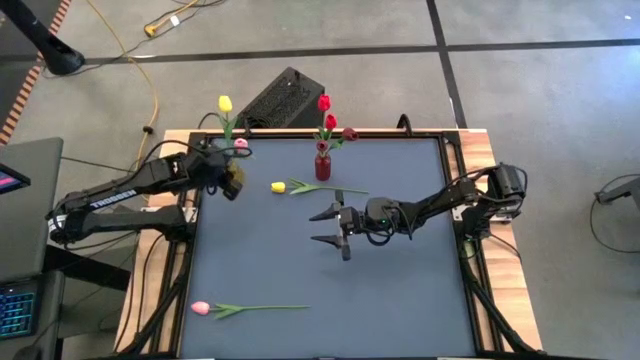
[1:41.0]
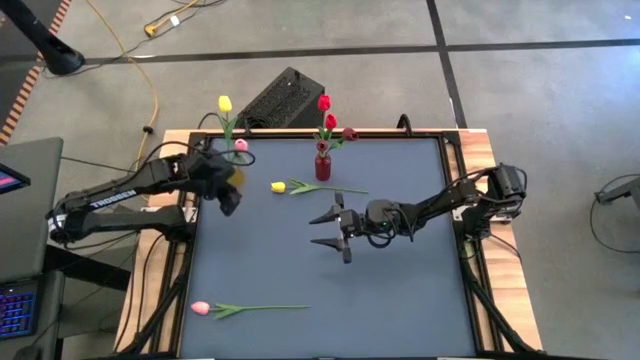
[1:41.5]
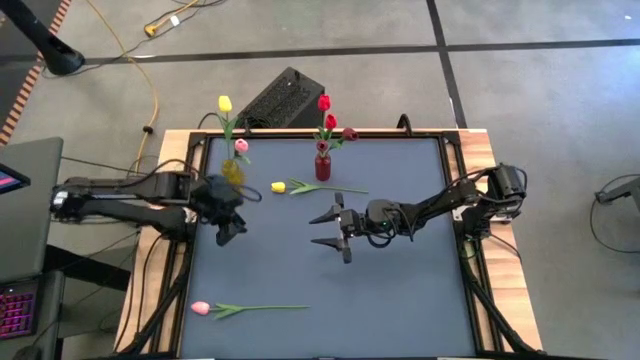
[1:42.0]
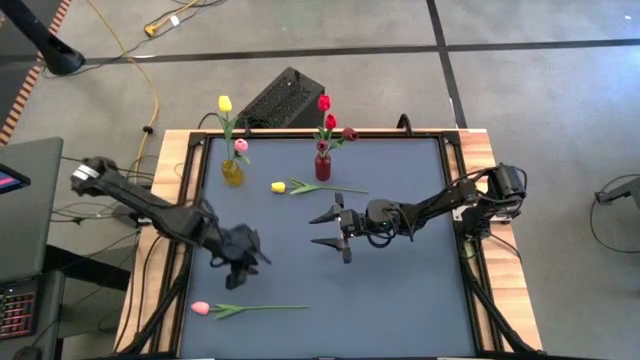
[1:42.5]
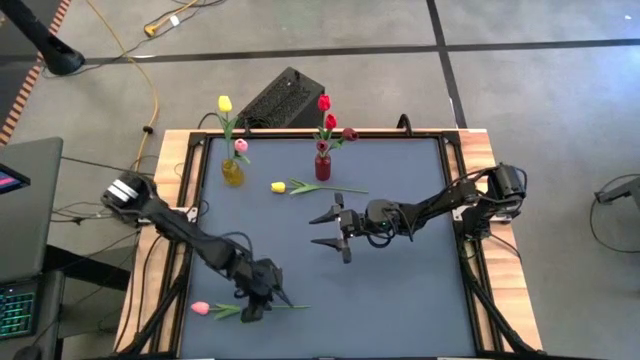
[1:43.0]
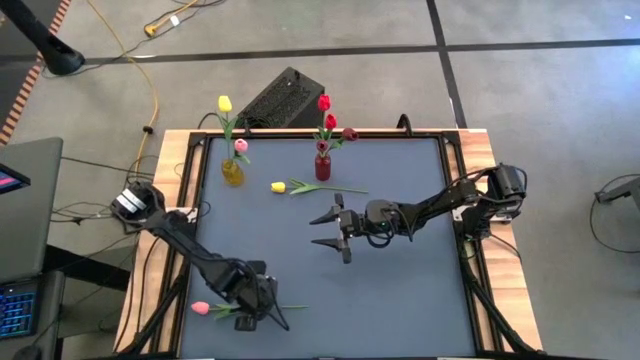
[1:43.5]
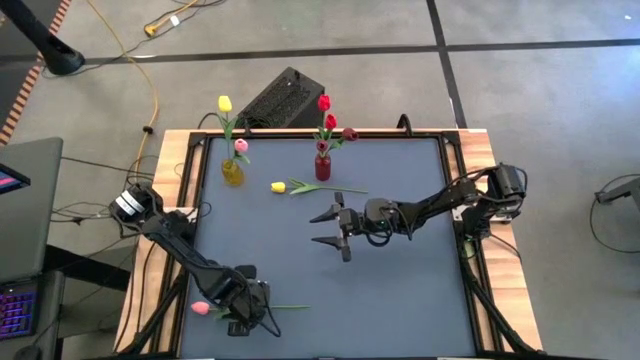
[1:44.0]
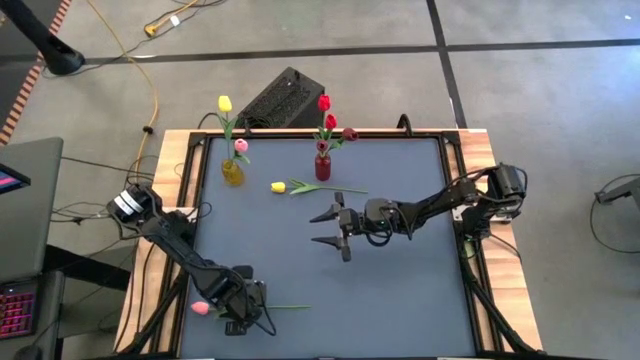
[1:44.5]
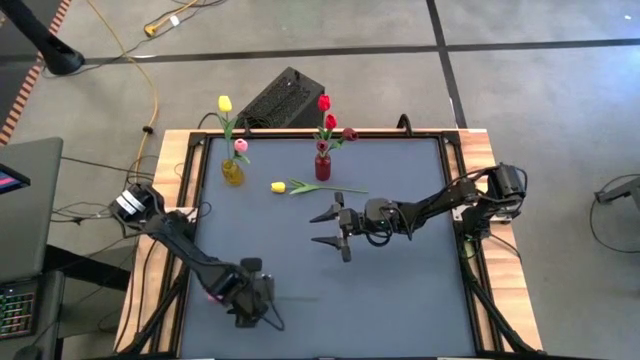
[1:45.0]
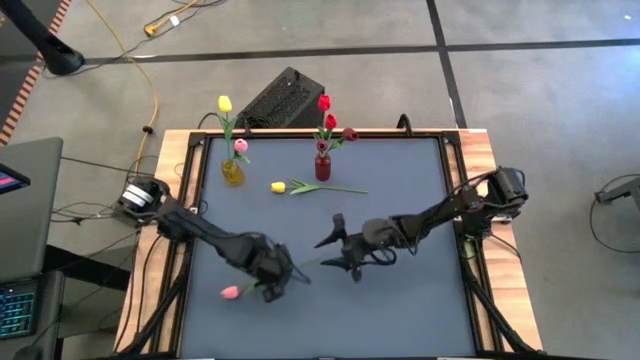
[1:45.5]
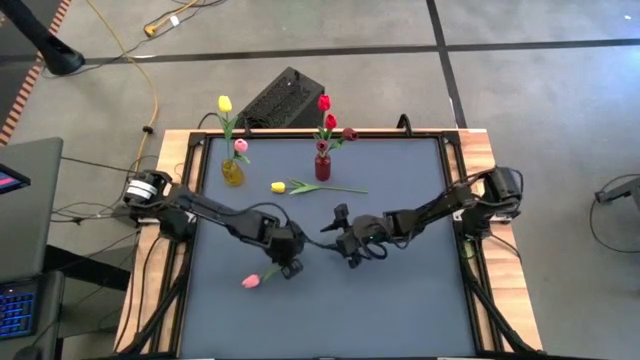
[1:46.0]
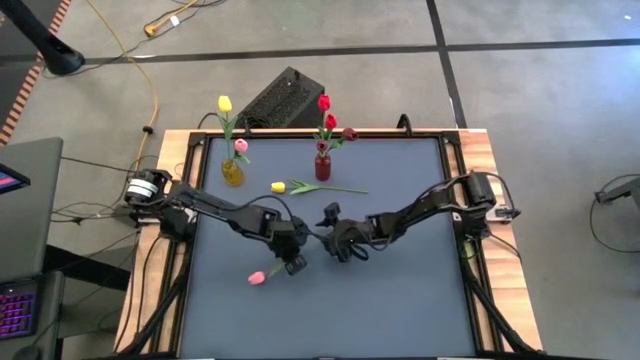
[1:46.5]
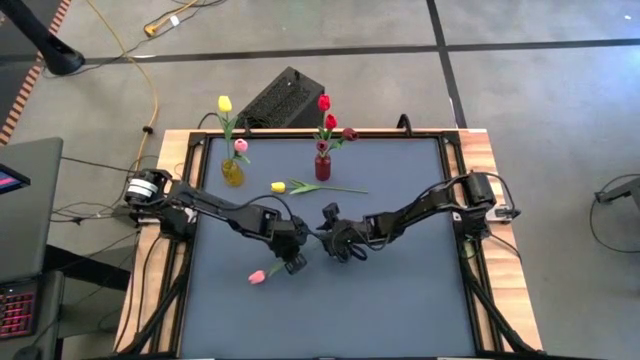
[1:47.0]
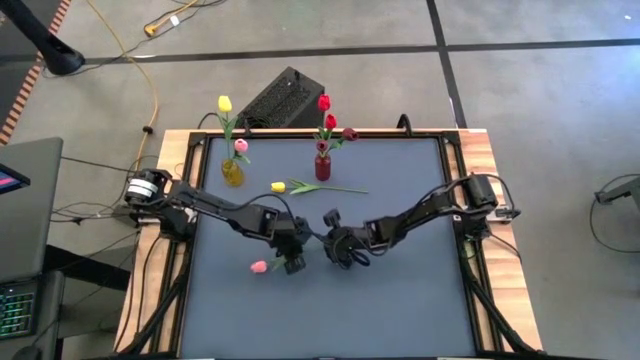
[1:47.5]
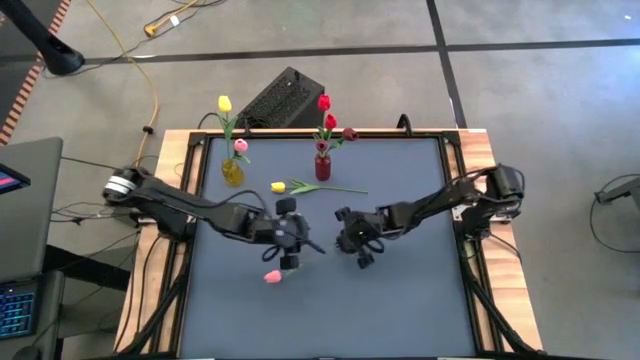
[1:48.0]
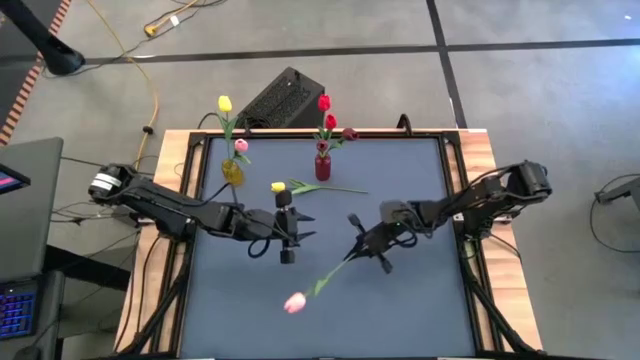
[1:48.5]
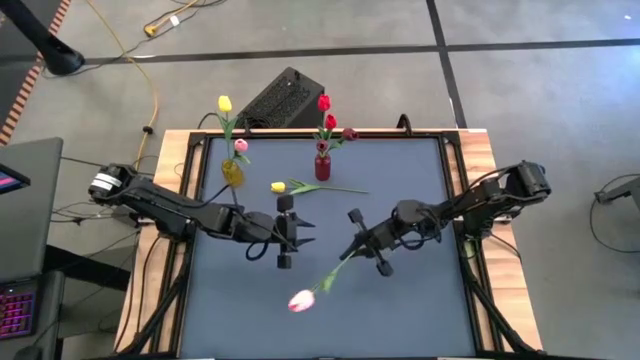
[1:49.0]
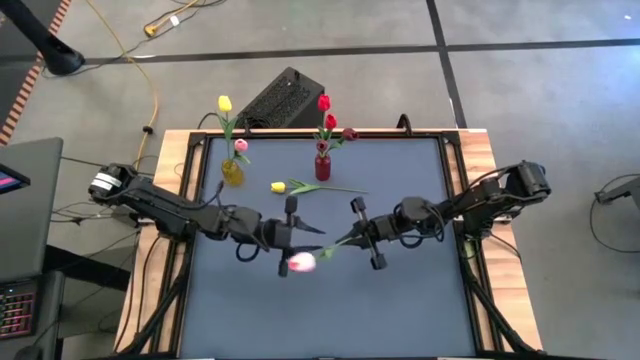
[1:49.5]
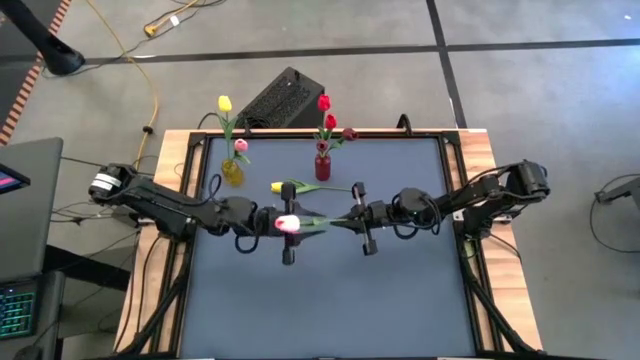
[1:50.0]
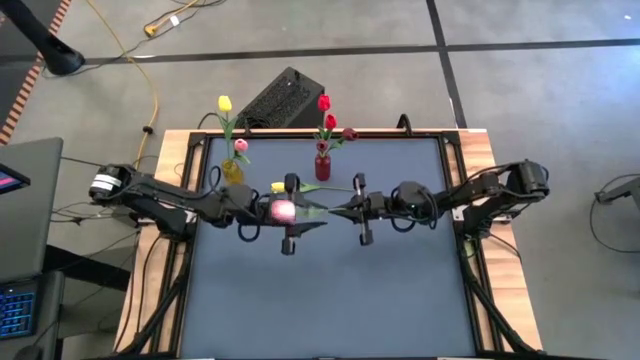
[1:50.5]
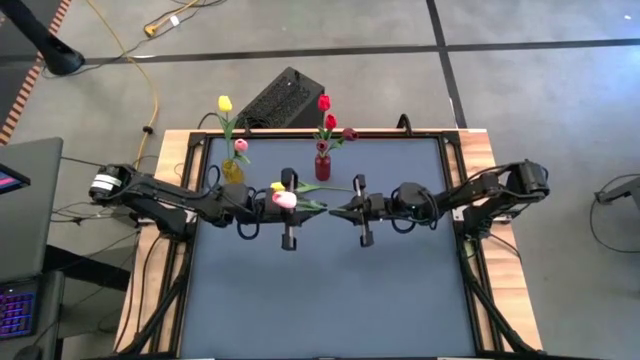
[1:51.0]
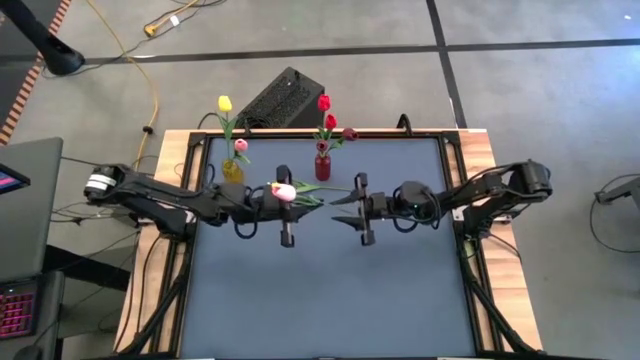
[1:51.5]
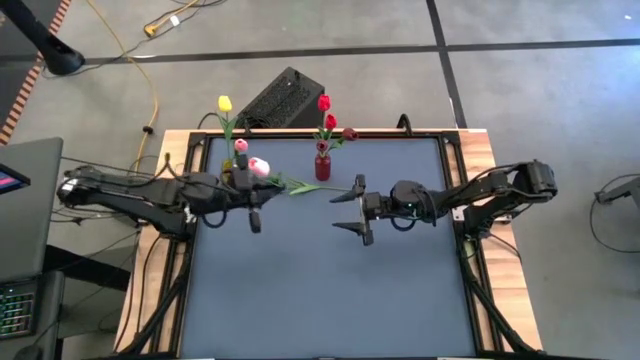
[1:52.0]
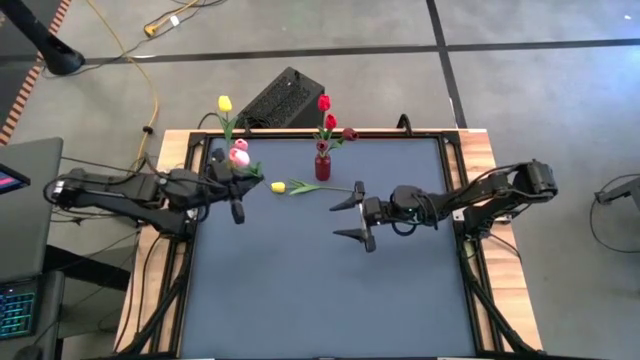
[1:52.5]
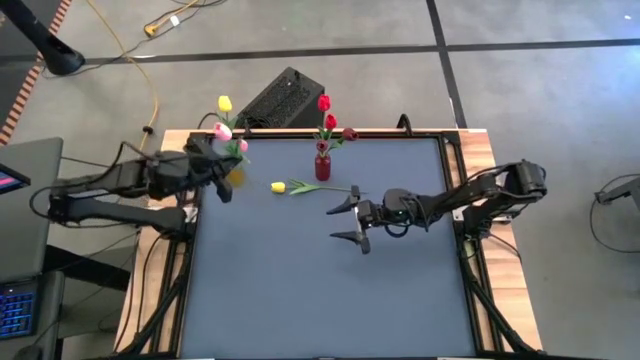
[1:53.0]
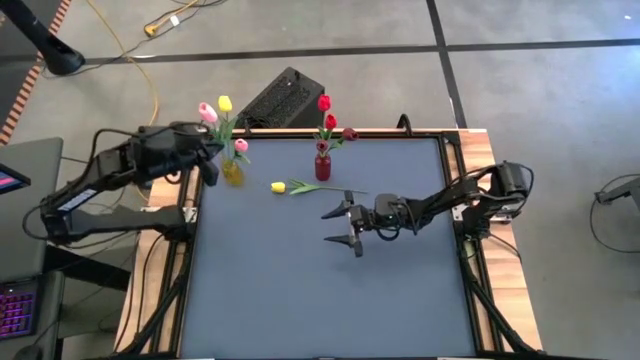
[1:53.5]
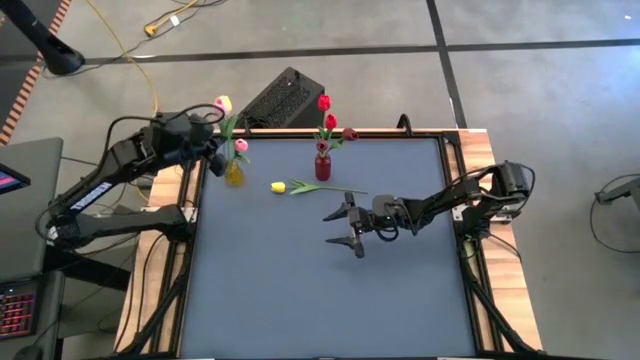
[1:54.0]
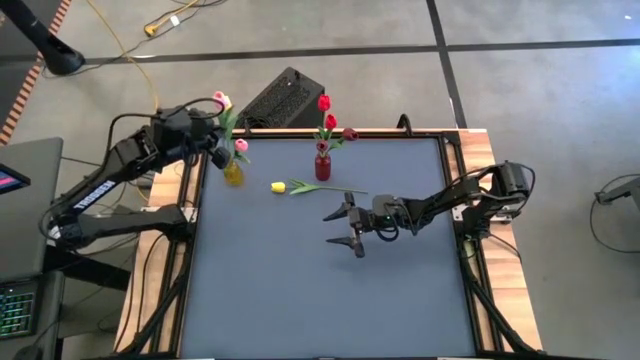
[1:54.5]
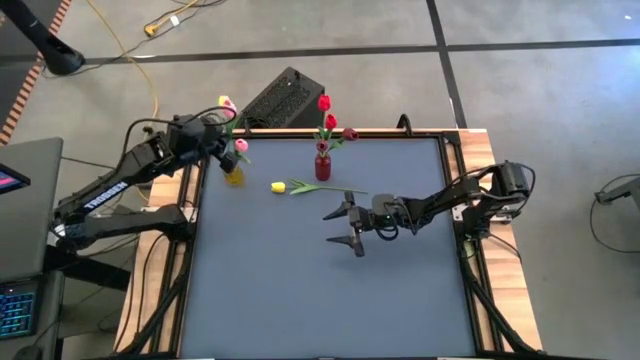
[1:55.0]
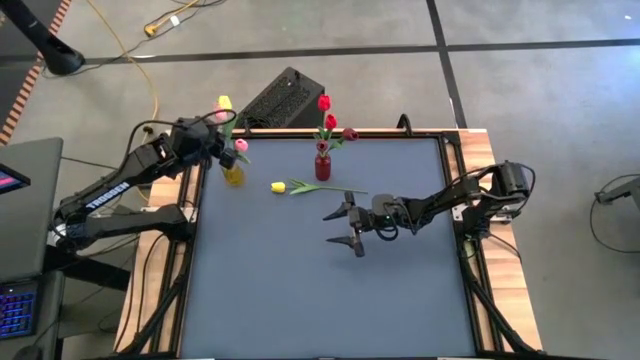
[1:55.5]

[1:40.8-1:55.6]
Task: Sort flowers into vase by color
Put the pink flower into the yellow flower vase

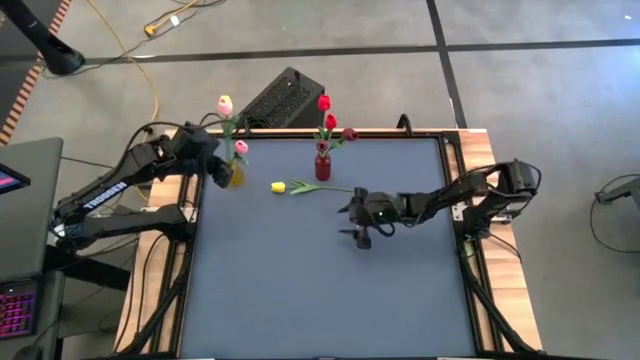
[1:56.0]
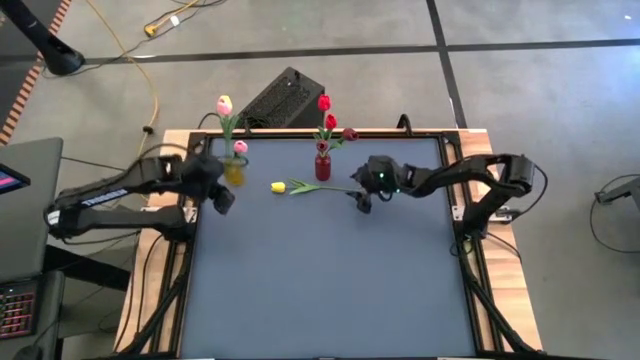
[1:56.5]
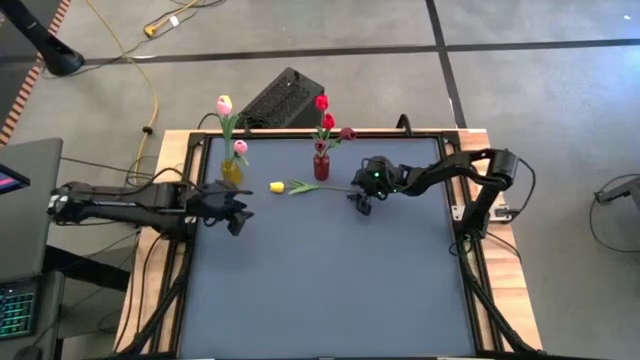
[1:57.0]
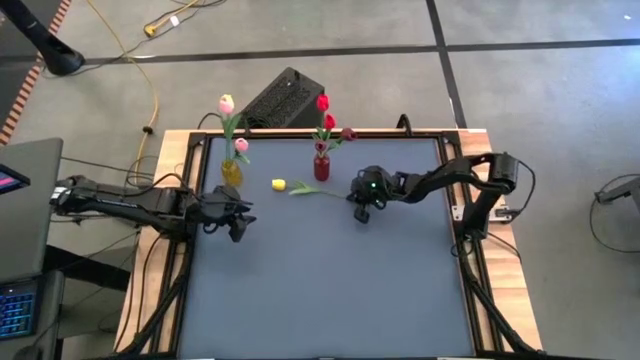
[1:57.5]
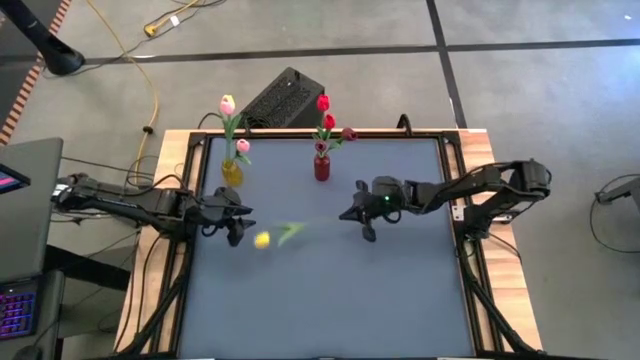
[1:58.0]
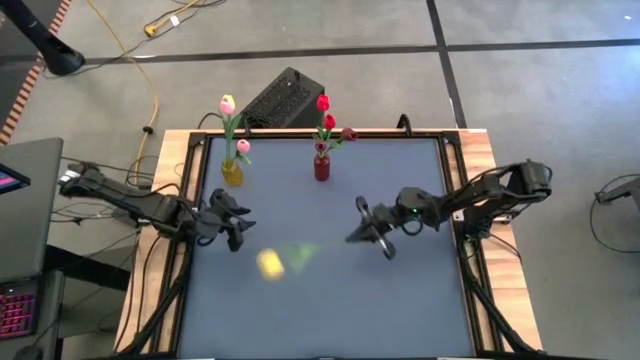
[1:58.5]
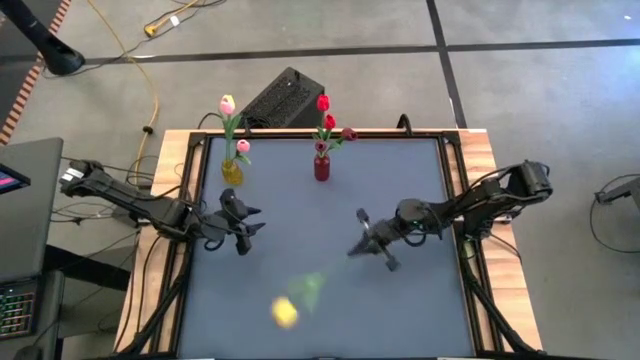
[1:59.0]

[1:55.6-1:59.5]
Put the yellow flower into the yellow flower vase

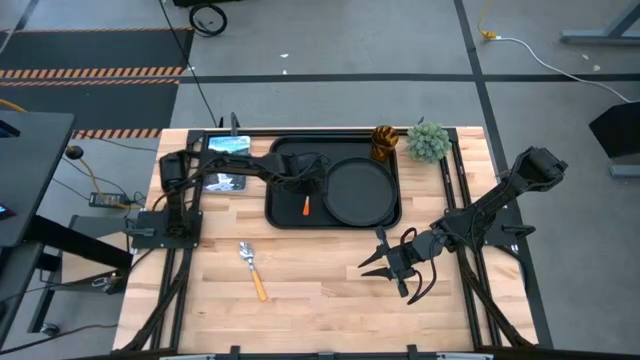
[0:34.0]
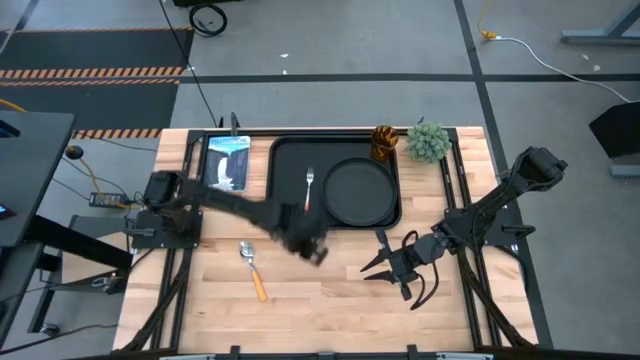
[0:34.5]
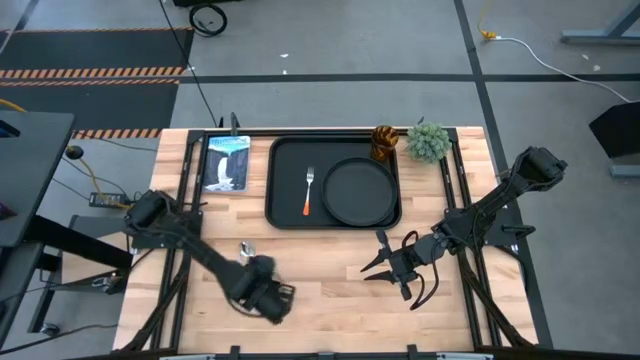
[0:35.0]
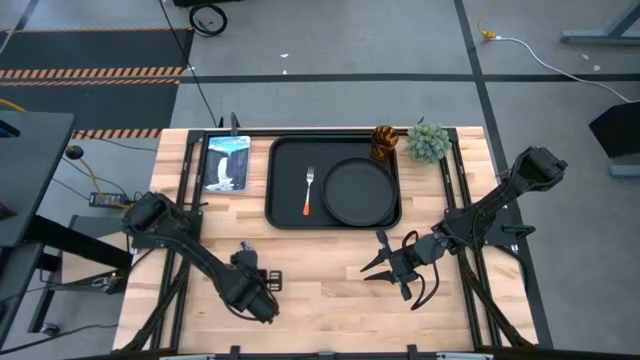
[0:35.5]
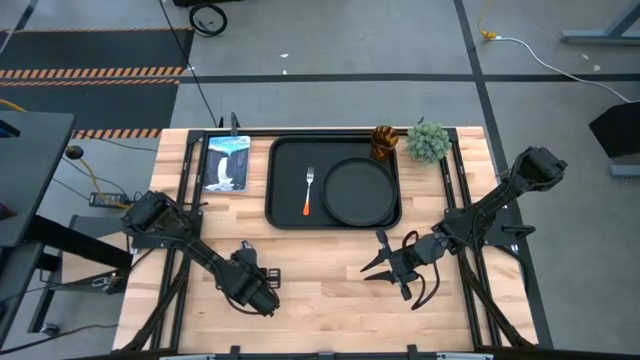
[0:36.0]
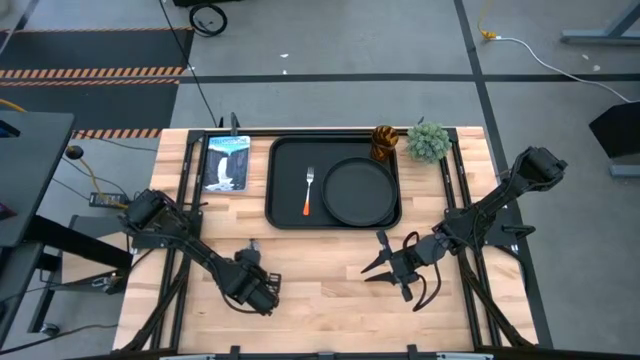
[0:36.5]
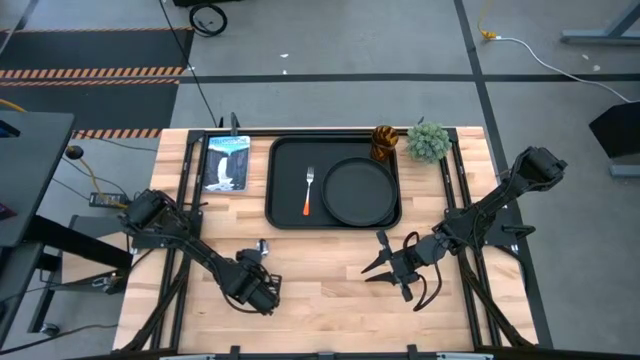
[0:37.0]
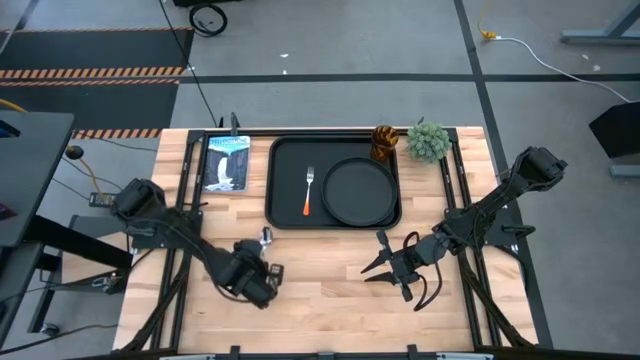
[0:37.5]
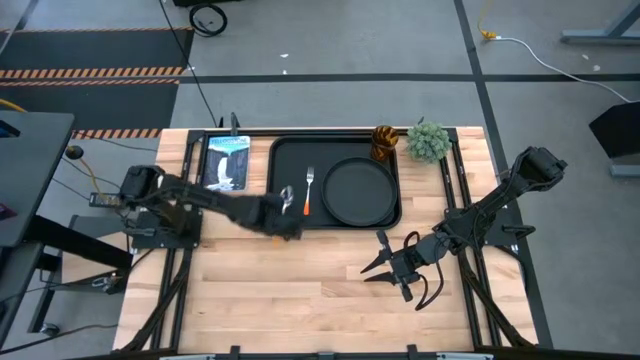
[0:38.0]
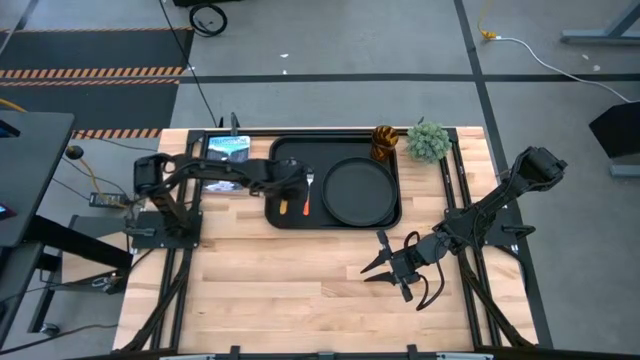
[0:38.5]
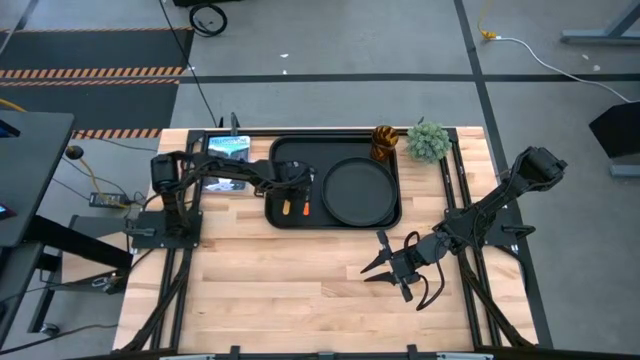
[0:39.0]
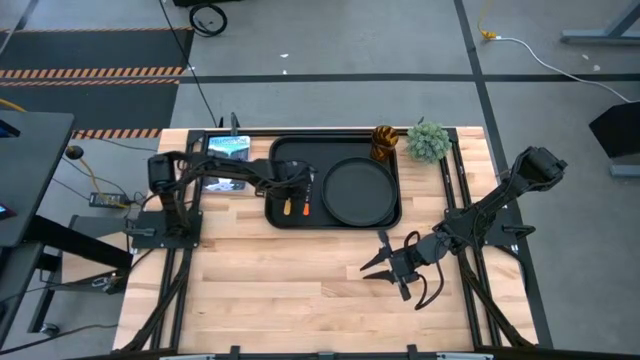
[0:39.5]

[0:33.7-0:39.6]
Task: Pick and place plate/cup/fork/spoon on tray
Put the yellow spoon on the black serving tray to the left of the orange fork
